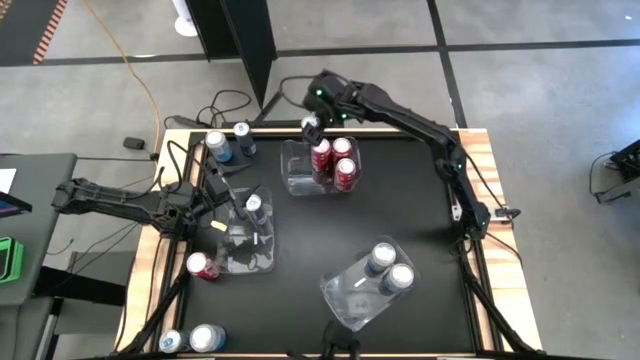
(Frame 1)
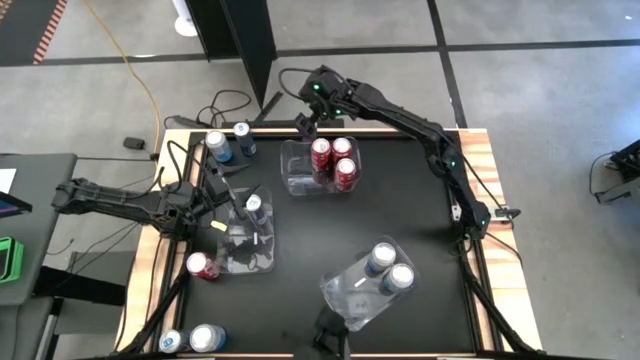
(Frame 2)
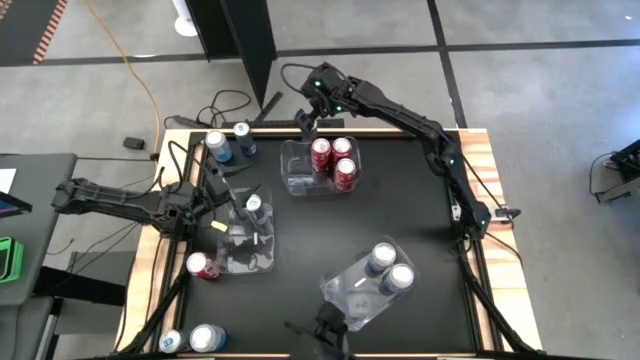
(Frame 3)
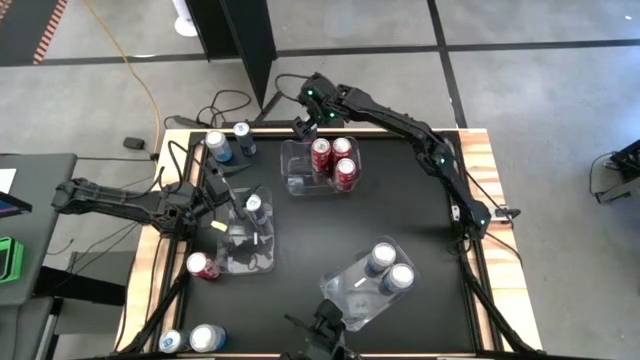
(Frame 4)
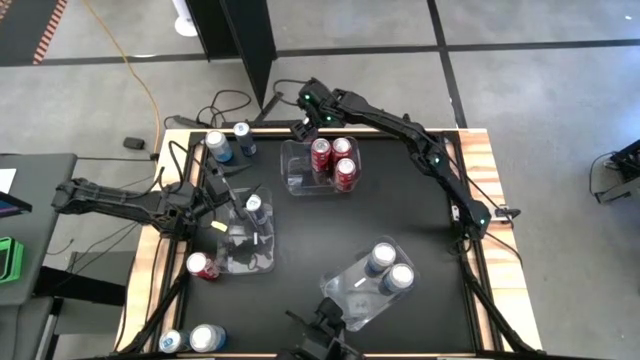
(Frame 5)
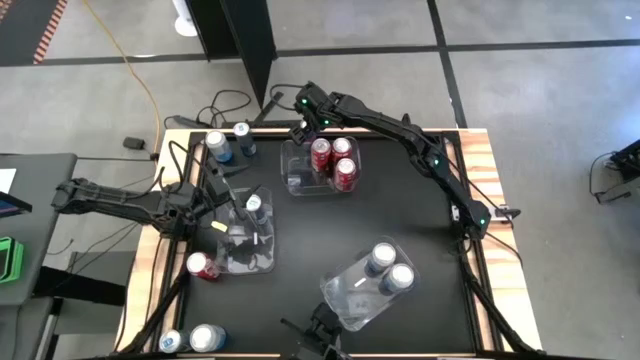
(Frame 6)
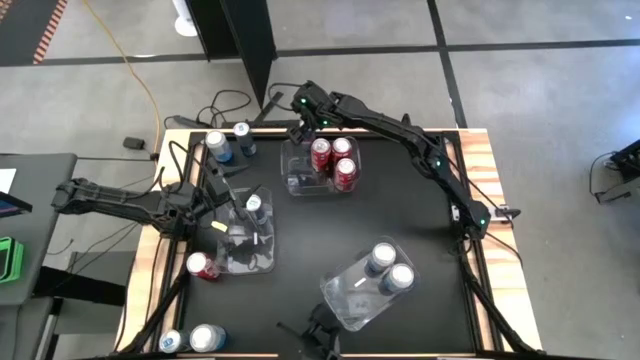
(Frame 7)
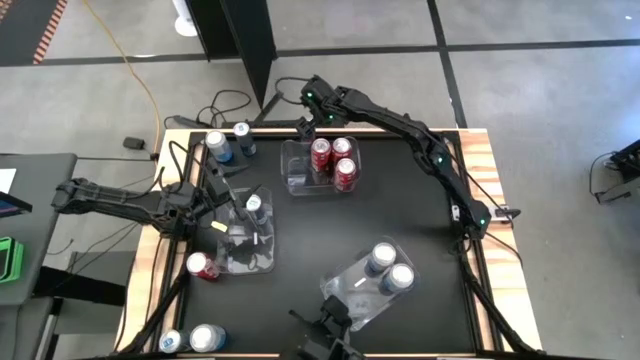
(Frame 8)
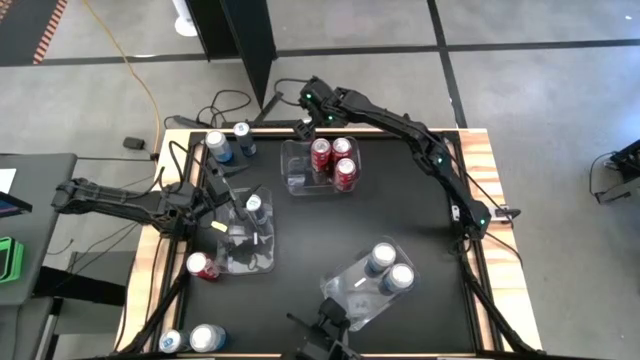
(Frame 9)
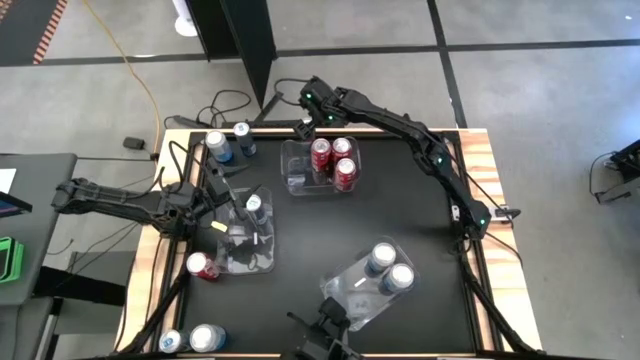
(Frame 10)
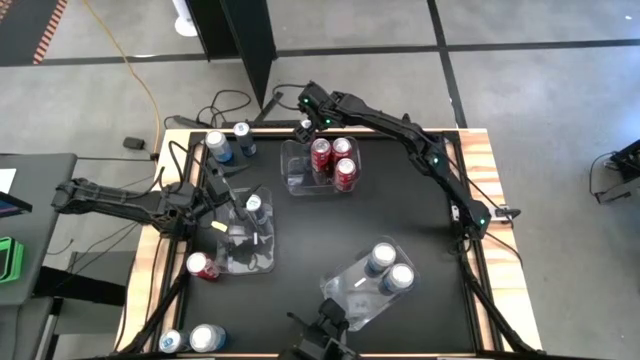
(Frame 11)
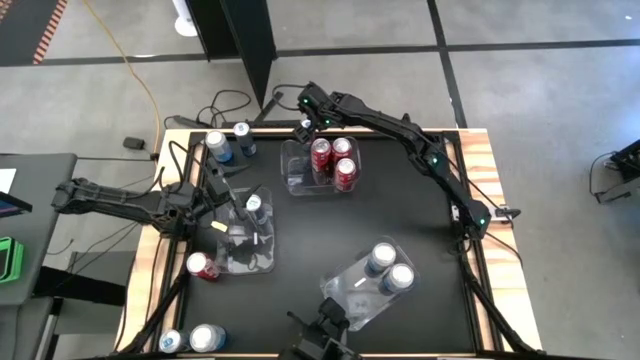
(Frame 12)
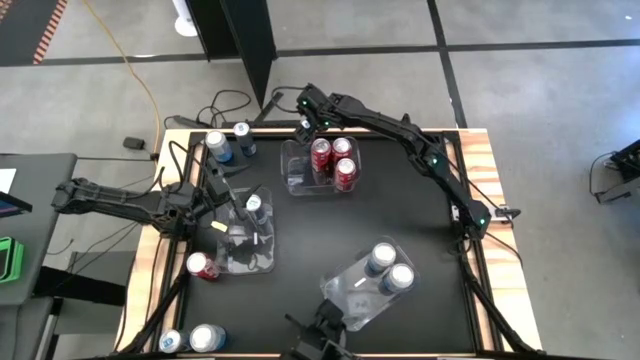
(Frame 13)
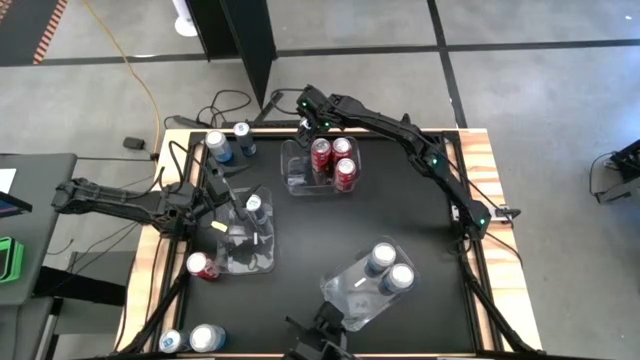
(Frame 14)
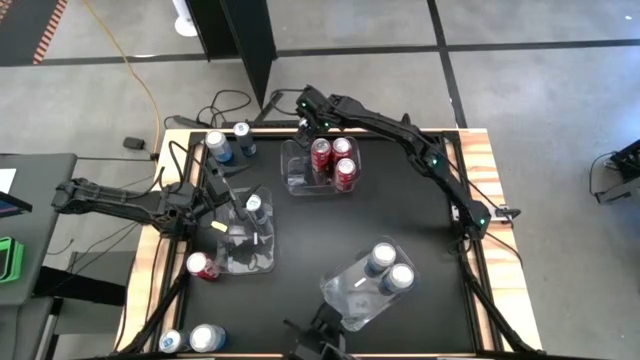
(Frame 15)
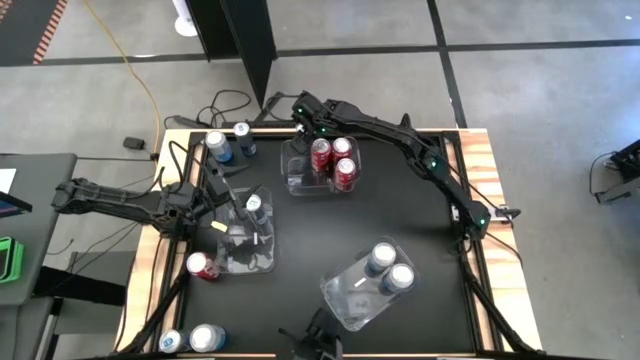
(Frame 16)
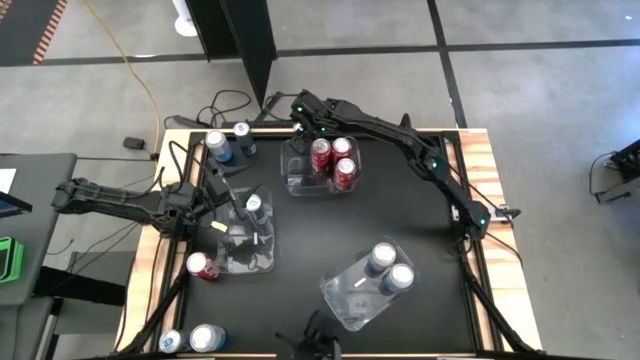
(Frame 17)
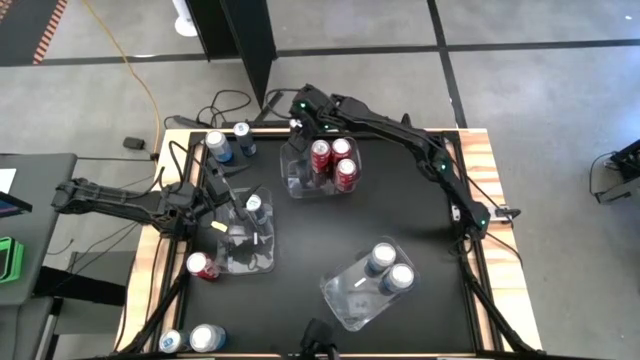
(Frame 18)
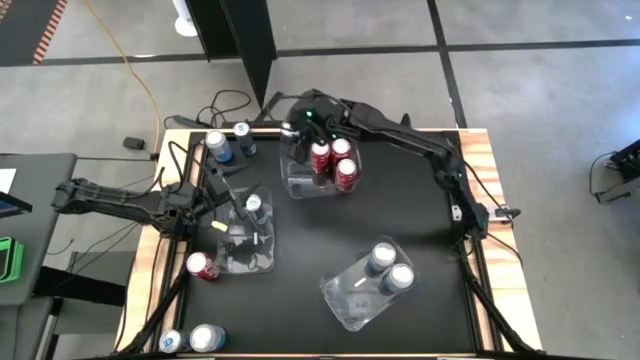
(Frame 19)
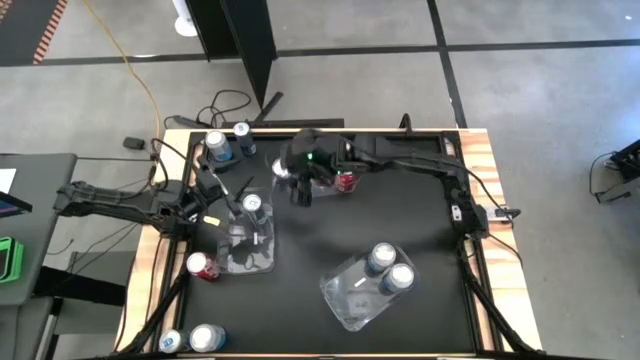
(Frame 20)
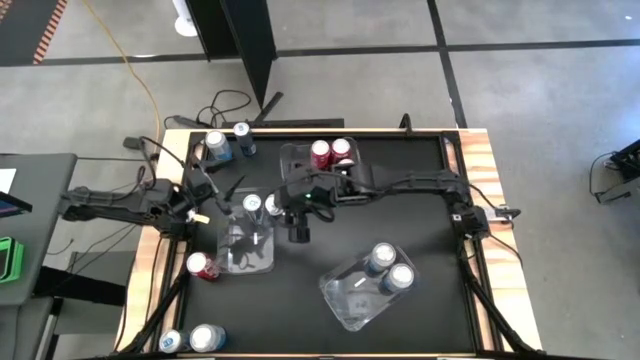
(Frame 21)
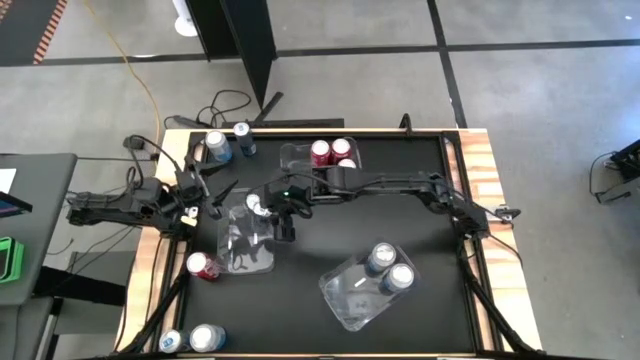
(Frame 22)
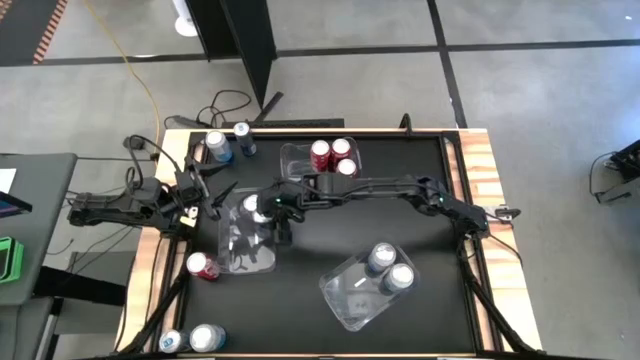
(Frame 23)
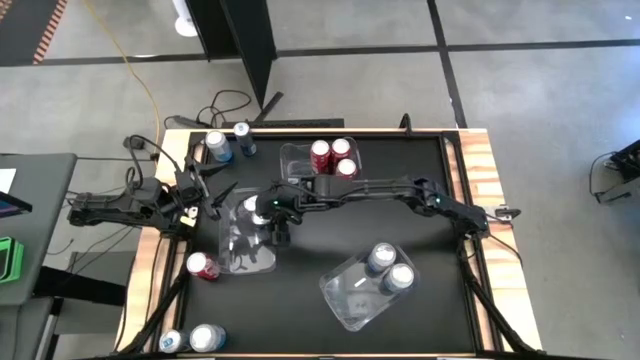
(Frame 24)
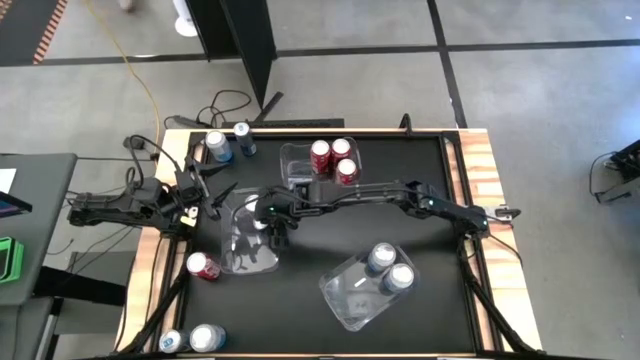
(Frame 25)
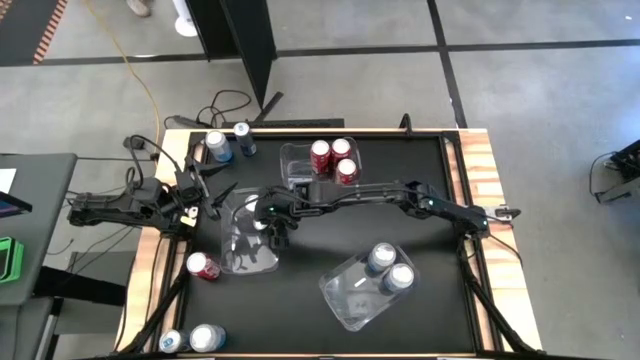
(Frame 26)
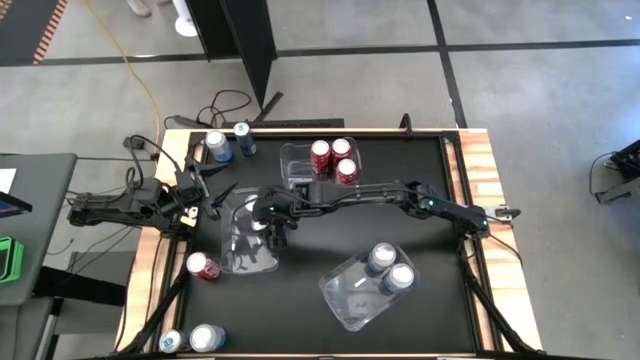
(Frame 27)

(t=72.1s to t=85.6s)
Task: Sort soda cans
Put the blue soda can into the middle left transparent bin

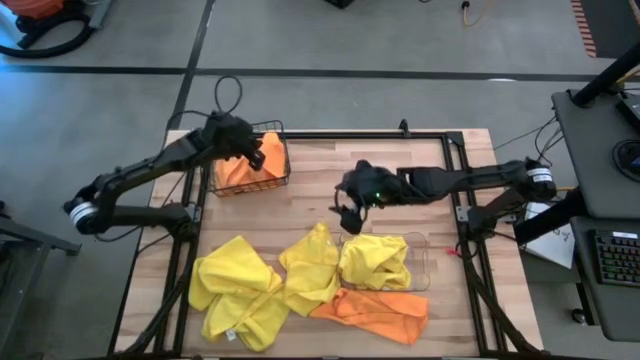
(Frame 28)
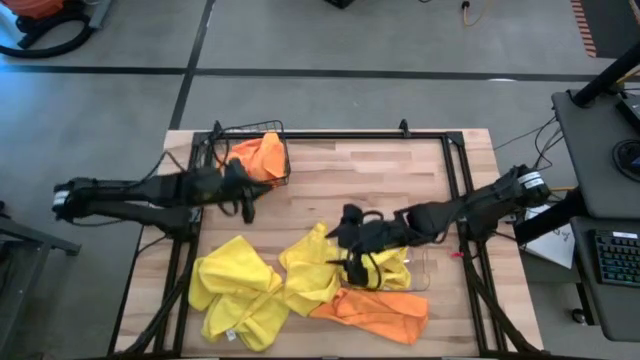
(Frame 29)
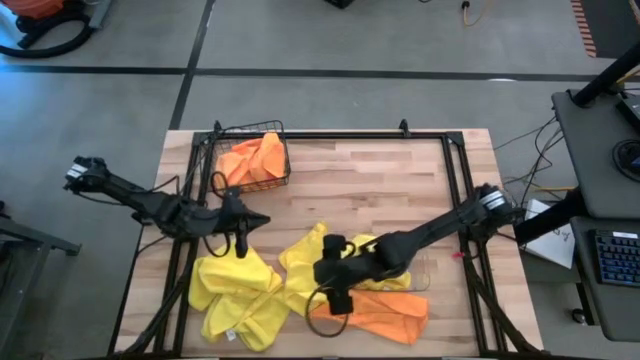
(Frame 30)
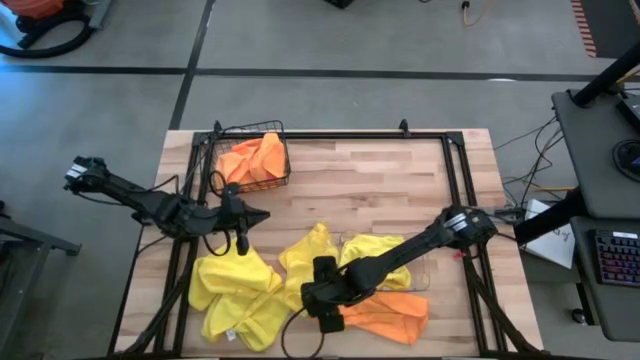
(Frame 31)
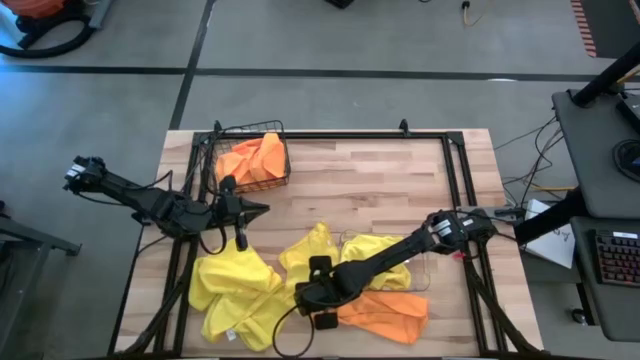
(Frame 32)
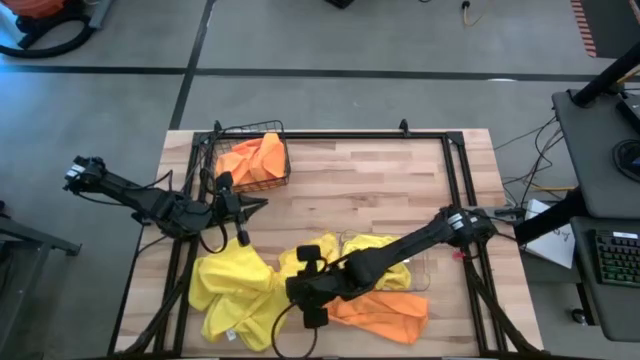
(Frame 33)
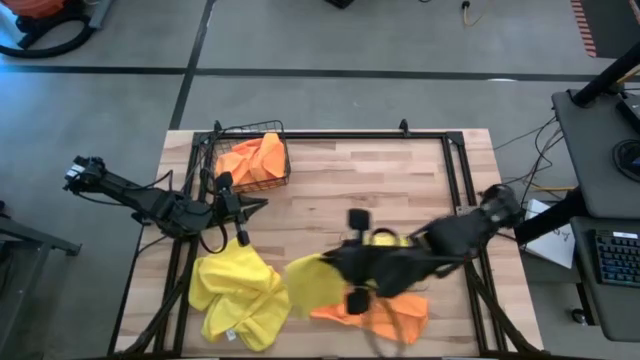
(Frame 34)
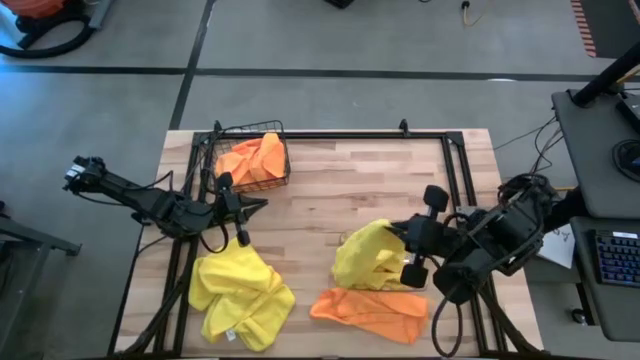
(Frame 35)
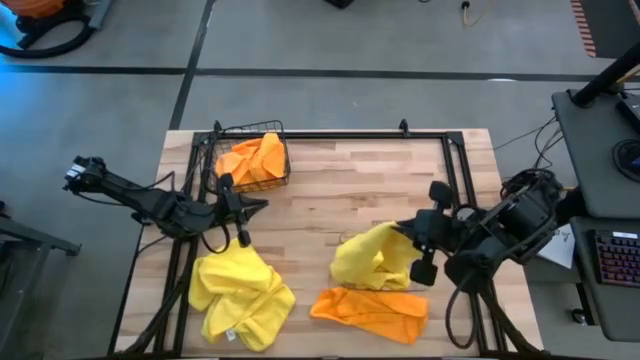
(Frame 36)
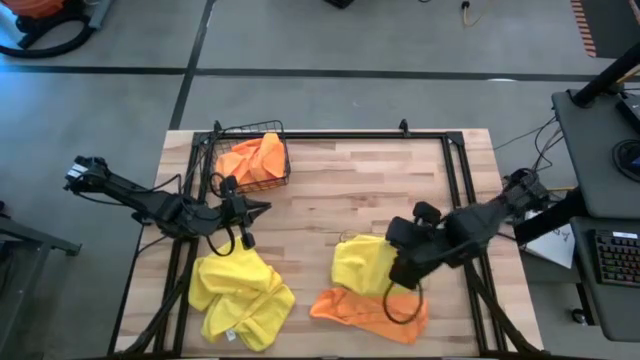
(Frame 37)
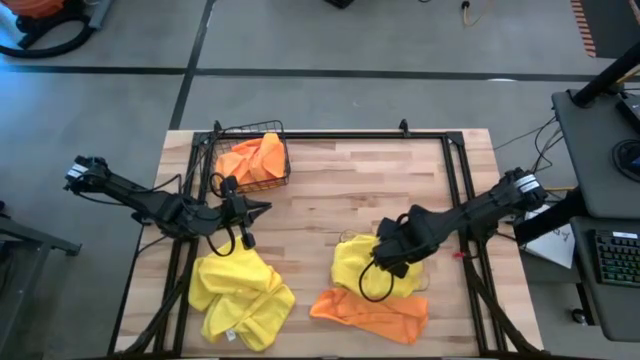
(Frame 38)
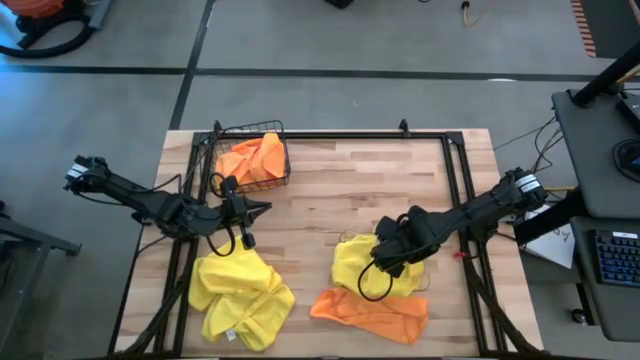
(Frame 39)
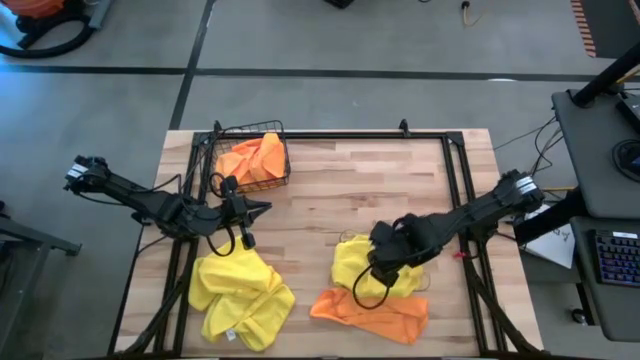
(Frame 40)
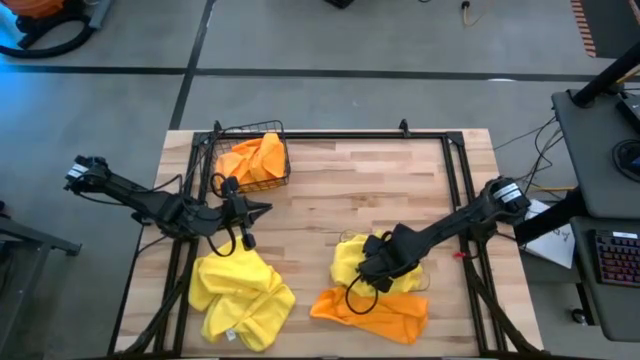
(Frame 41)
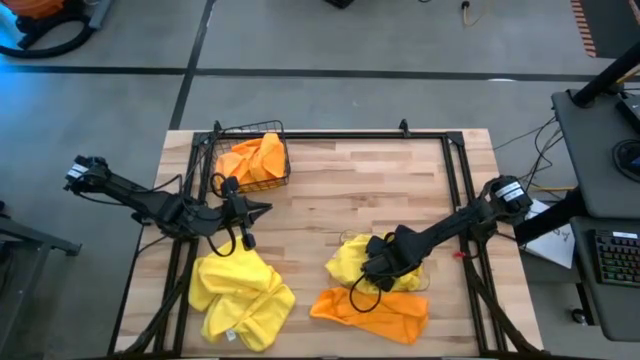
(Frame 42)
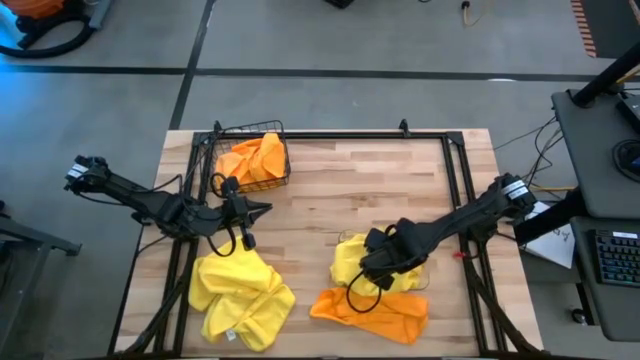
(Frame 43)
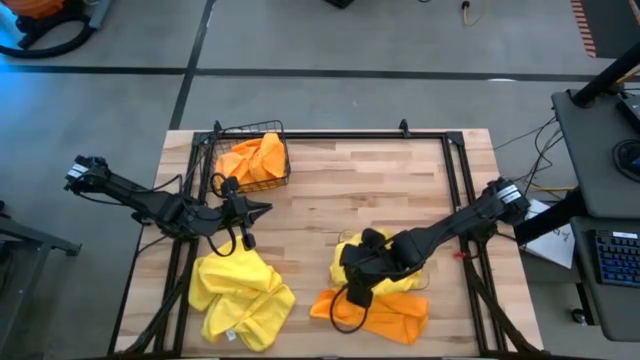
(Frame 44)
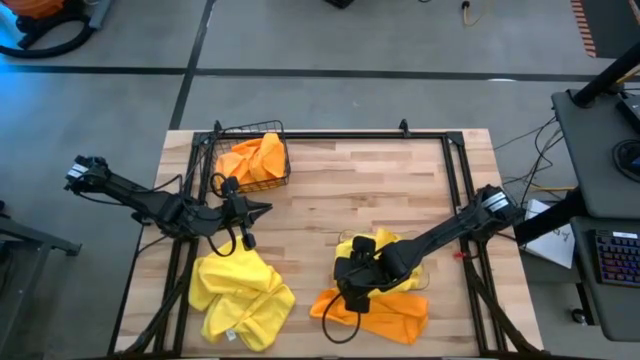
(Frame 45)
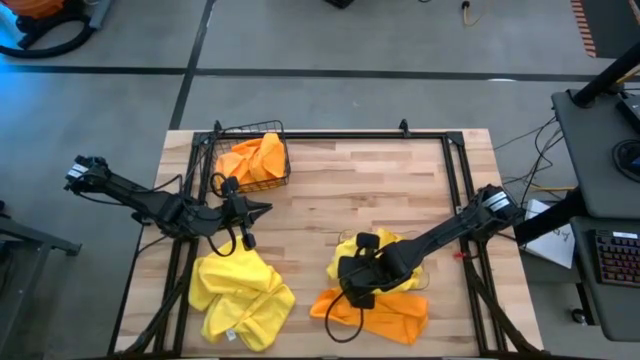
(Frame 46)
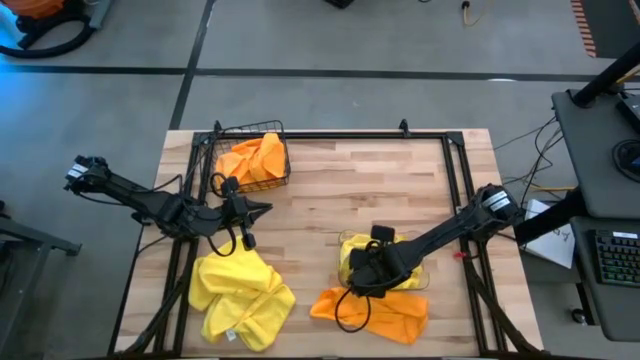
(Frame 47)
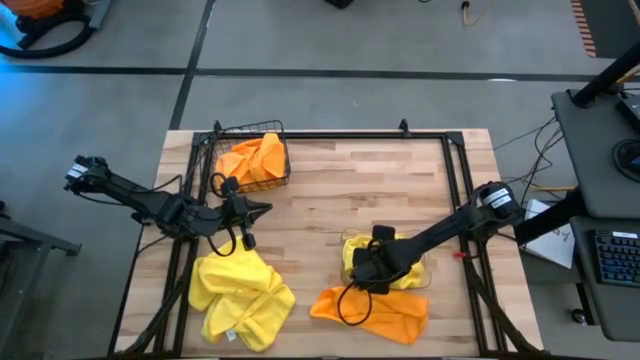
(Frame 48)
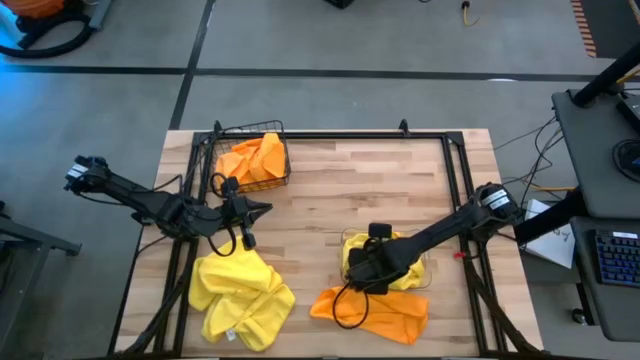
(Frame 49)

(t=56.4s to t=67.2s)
Task: Sort microfiber towel by color & place in baskets
Put the yellow towel into the transparent bin
